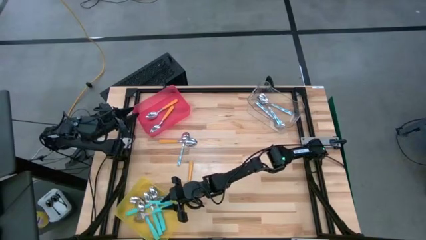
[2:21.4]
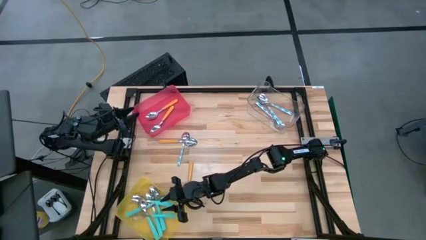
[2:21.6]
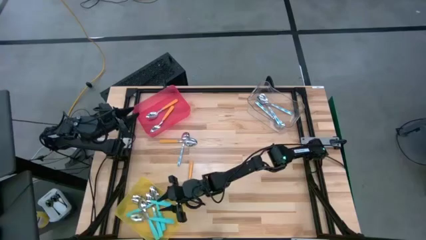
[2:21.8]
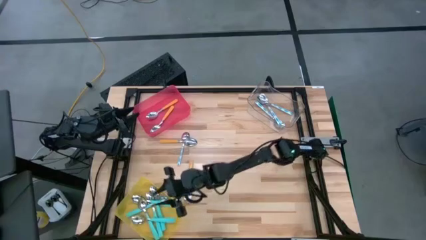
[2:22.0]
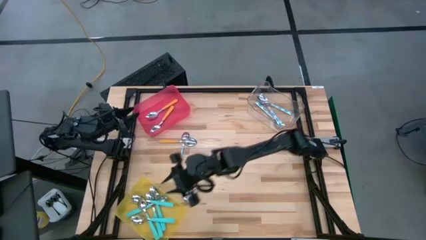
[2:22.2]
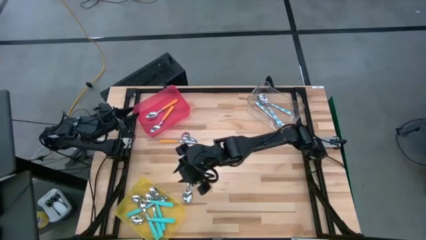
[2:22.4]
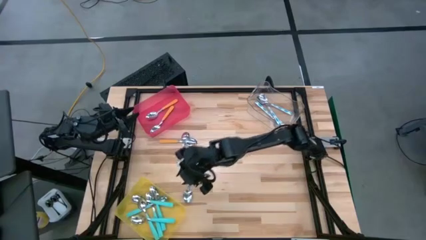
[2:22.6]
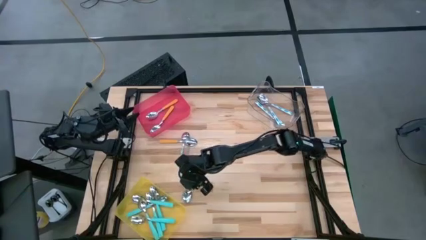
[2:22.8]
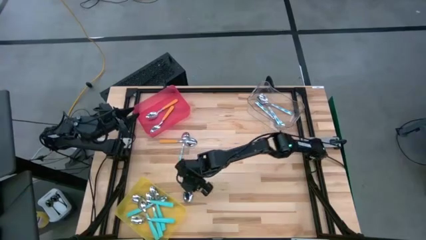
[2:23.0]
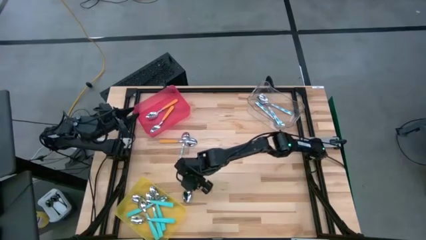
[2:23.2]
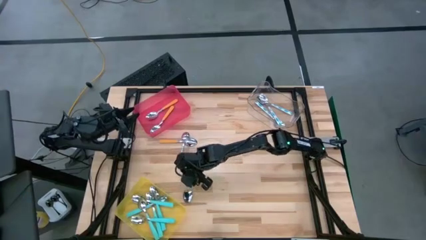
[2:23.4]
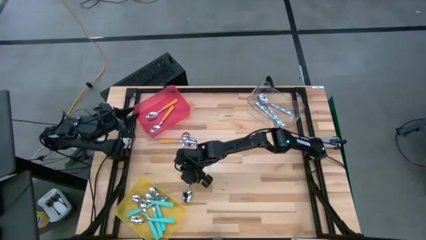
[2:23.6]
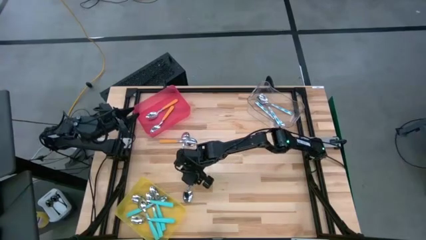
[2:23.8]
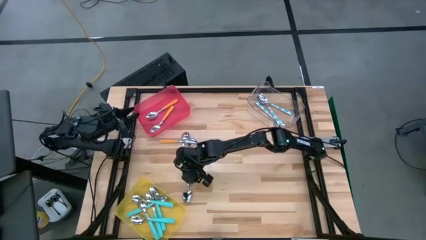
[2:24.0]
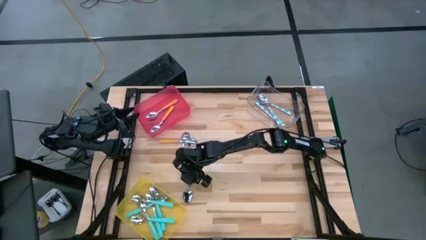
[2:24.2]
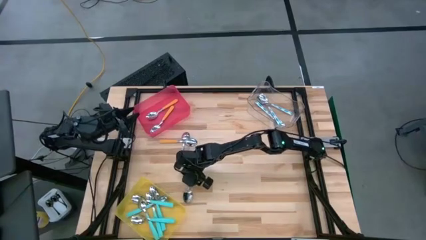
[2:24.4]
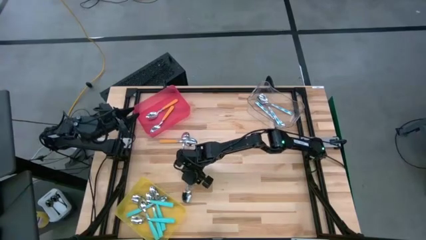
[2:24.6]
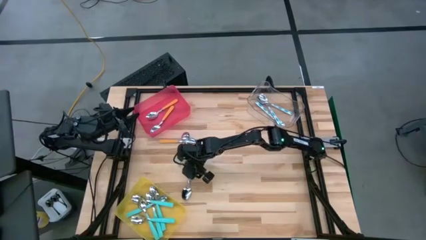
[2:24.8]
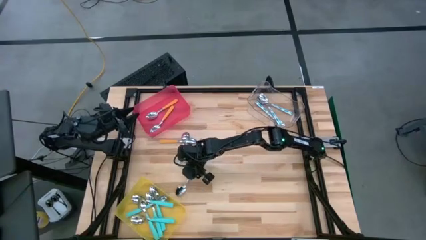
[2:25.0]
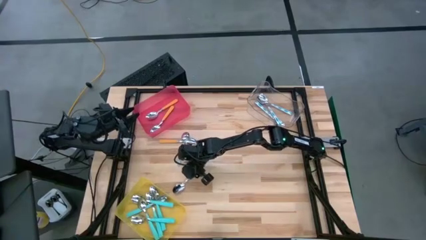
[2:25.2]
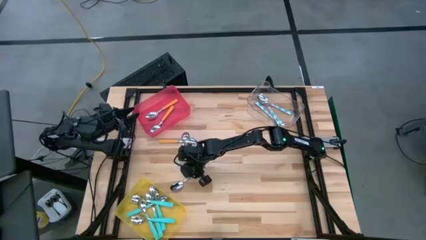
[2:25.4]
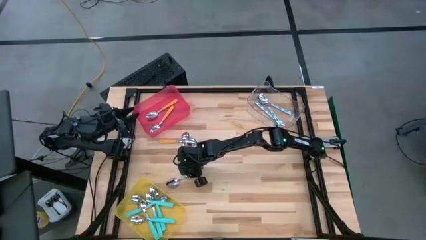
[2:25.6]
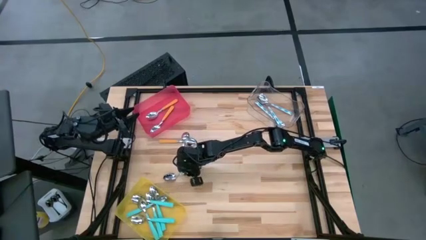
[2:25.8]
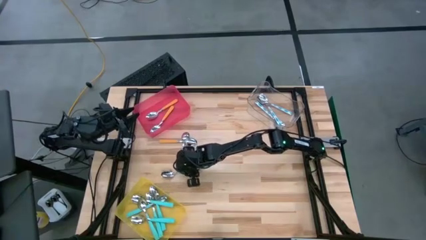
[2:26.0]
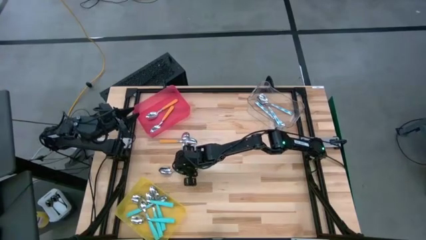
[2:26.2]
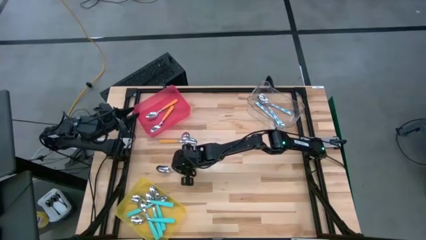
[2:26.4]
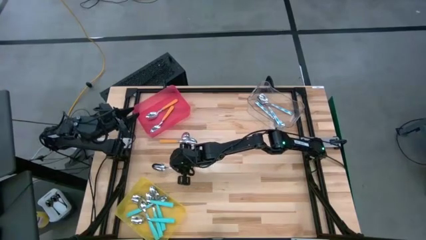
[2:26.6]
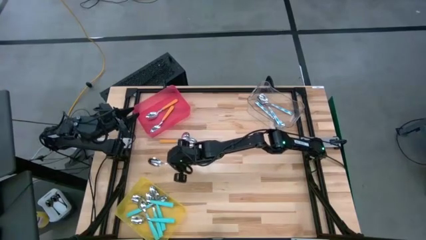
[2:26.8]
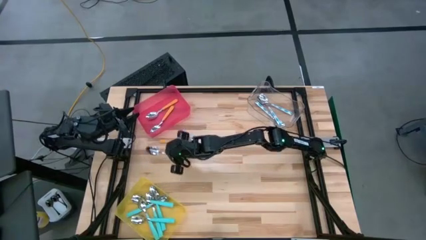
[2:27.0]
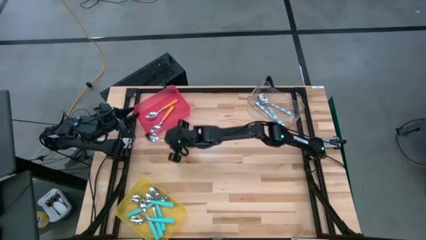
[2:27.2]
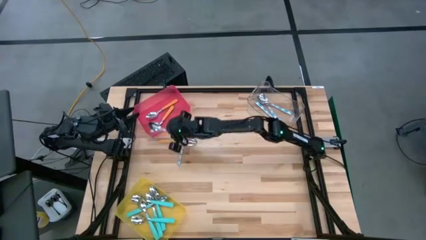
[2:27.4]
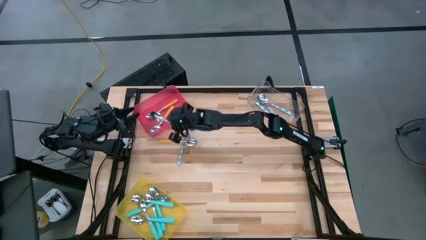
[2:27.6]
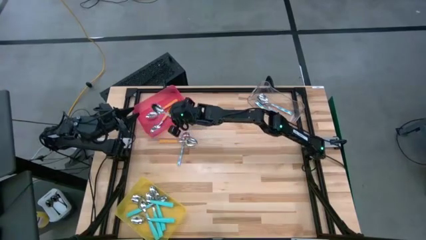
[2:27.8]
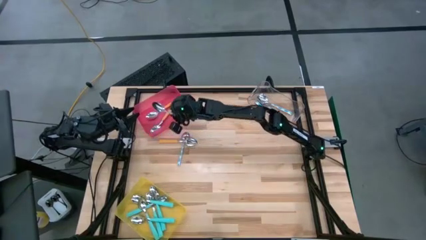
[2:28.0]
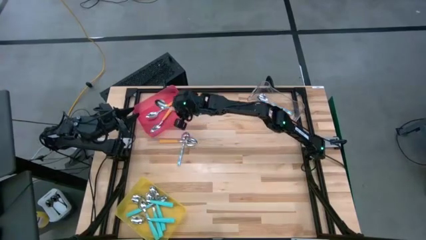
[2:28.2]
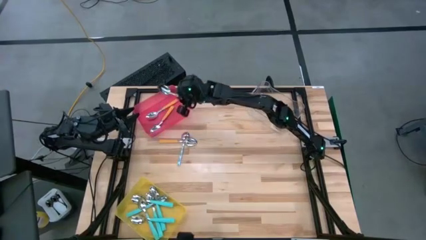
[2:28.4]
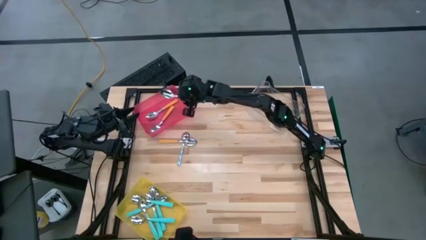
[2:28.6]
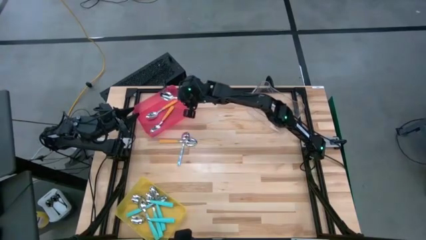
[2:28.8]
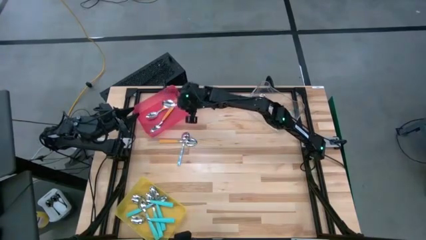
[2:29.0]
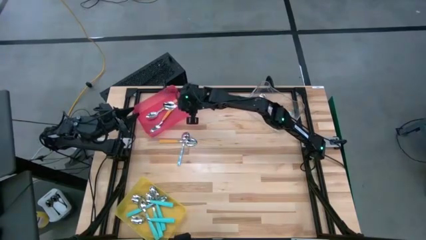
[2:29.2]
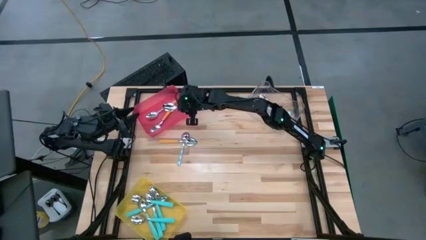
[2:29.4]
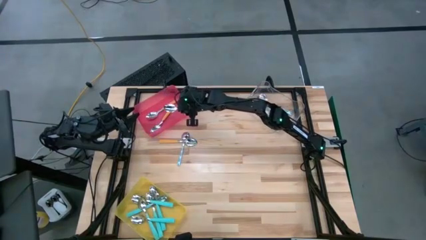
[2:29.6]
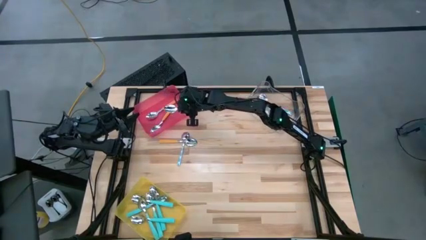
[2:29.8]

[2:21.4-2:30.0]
Task: Sort silverware by color (type)
Put the orange spoon into the red bin

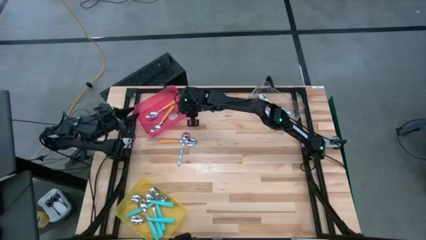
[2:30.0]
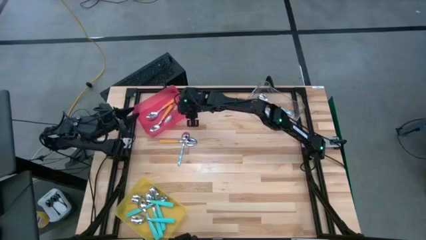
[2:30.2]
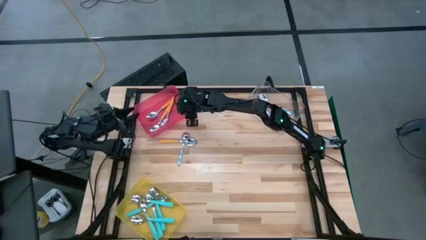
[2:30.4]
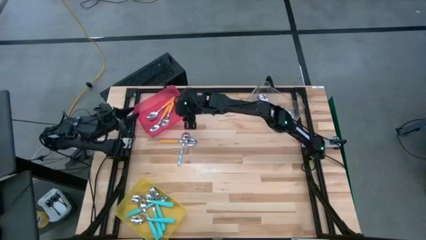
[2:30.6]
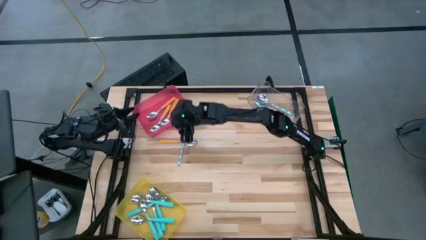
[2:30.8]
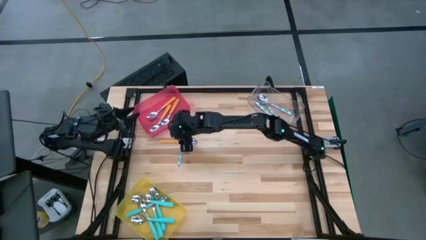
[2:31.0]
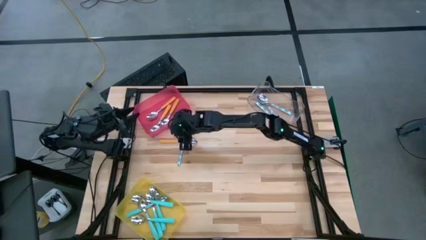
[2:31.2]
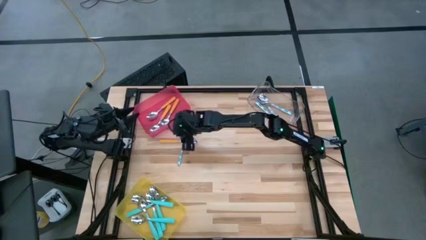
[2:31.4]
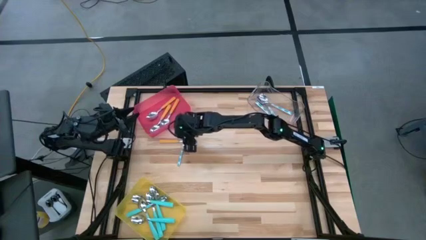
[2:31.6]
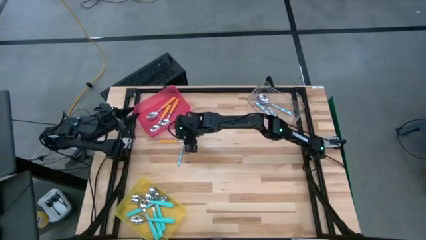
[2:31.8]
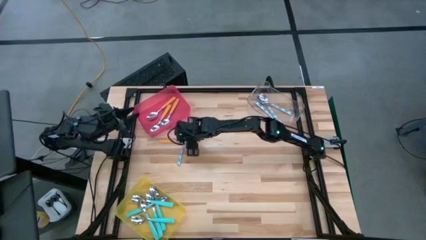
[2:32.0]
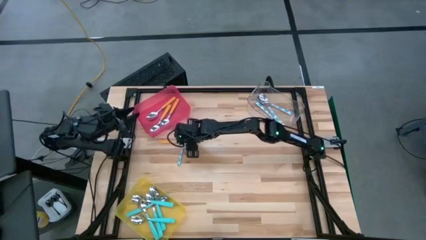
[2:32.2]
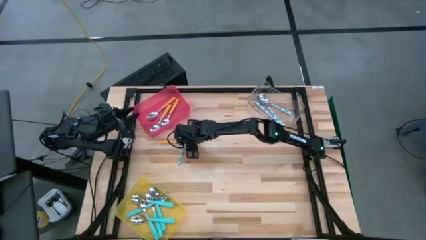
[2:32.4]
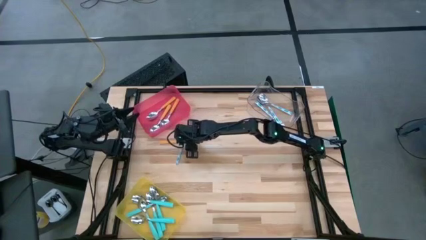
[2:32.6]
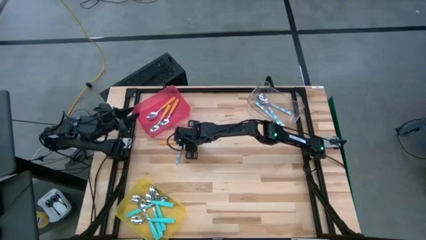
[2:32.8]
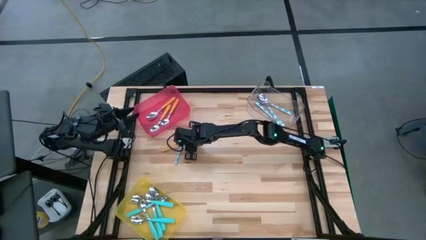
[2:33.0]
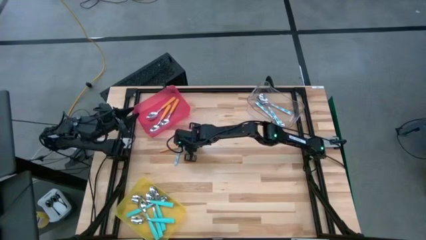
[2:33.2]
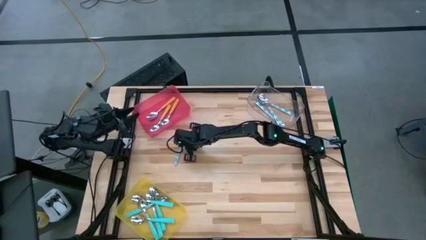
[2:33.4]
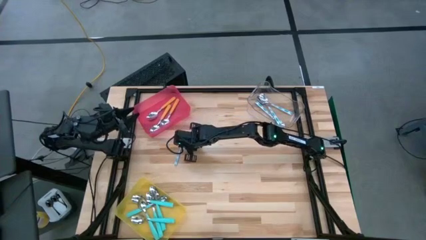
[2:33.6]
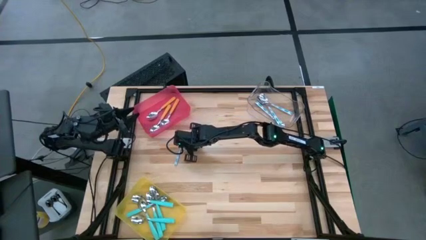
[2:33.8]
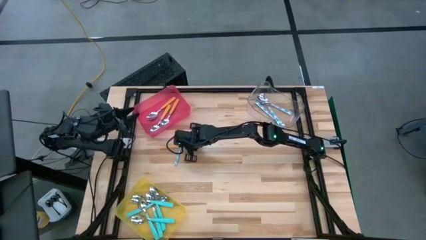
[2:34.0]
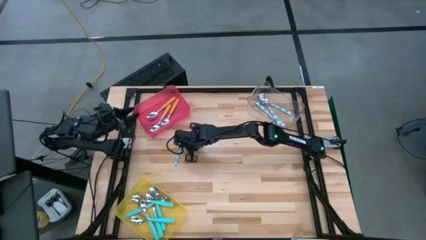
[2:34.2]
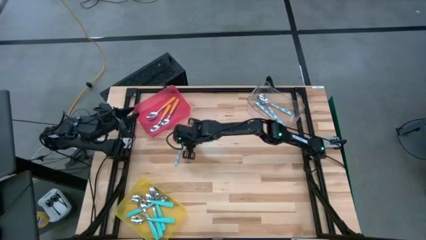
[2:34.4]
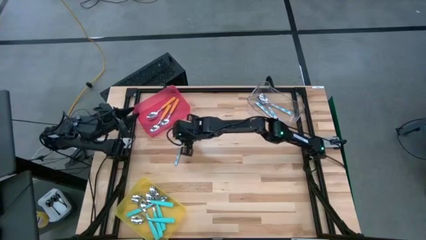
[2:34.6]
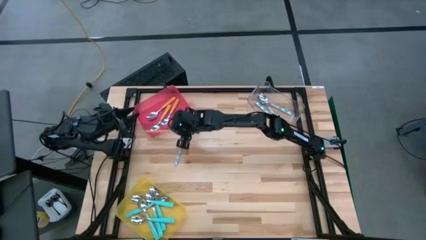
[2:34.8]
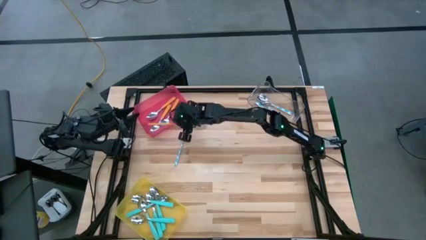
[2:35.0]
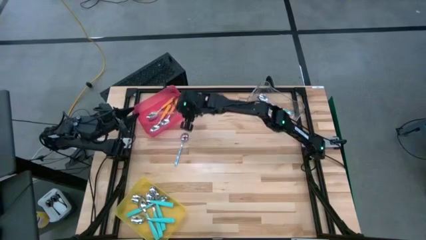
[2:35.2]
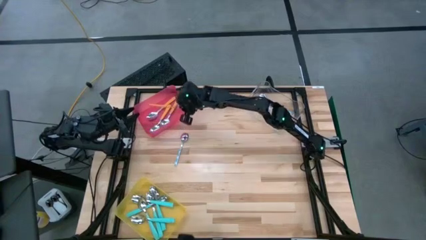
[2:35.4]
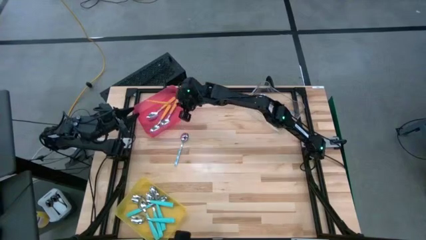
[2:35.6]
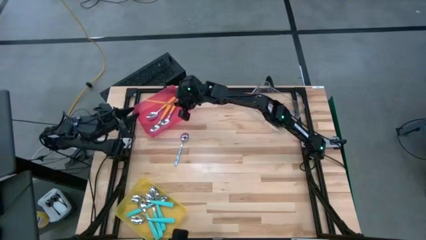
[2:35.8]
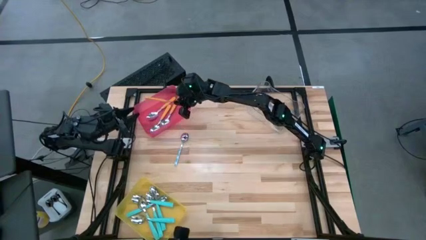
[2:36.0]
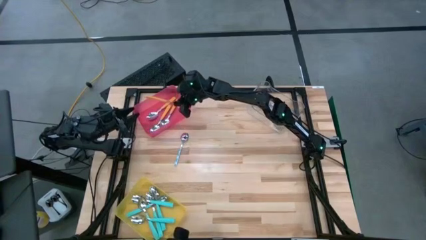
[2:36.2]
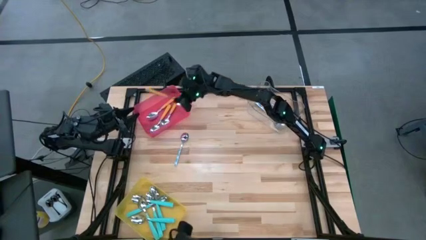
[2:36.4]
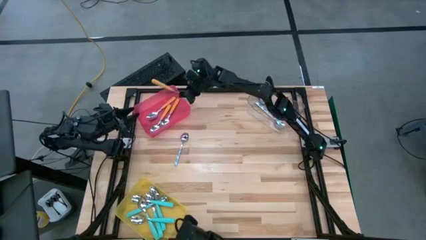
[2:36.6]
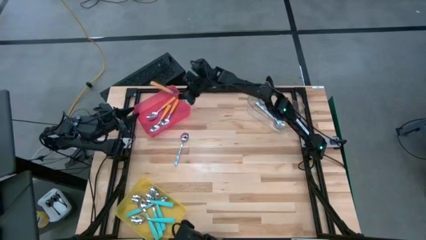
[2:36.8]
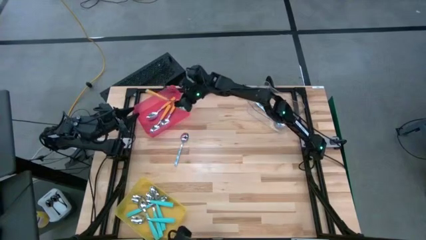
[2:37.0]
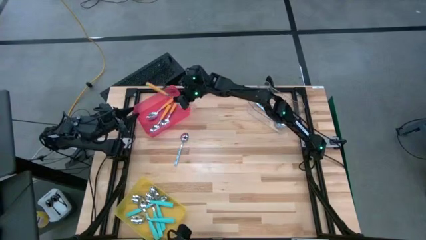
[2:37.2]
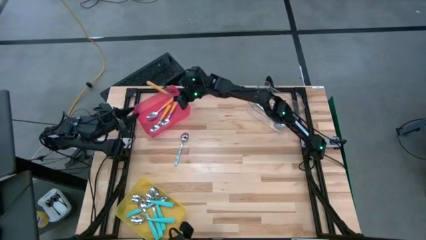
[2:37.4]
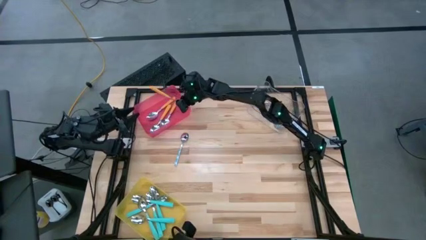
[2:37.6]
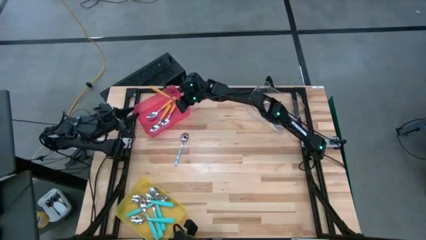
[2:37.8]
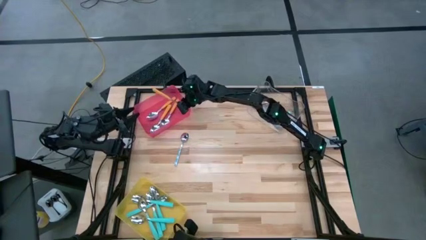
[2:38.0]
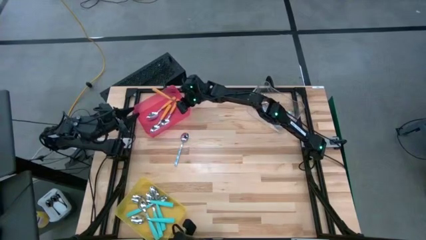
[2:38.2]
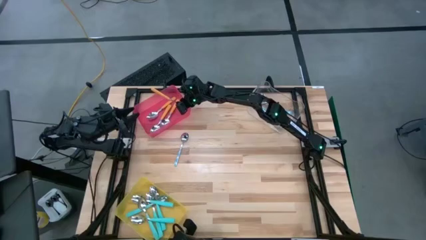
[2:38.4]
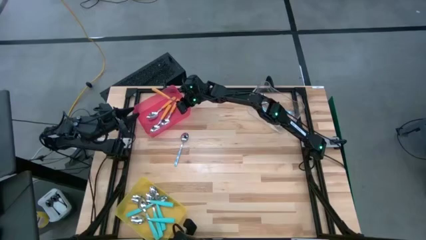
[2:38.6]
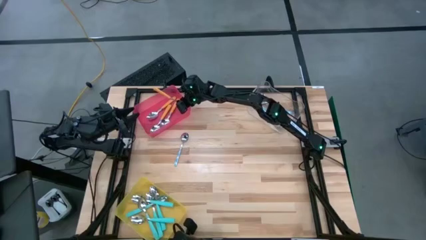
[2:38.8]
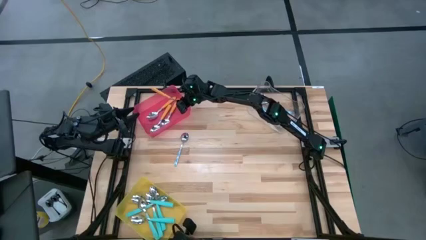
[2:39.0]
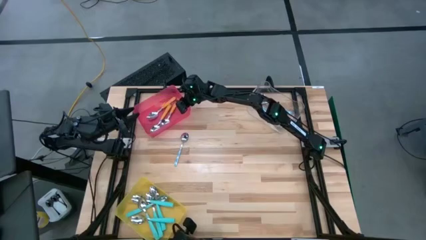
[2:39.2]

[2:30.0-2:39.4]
Put the orange spoon into the red bin
